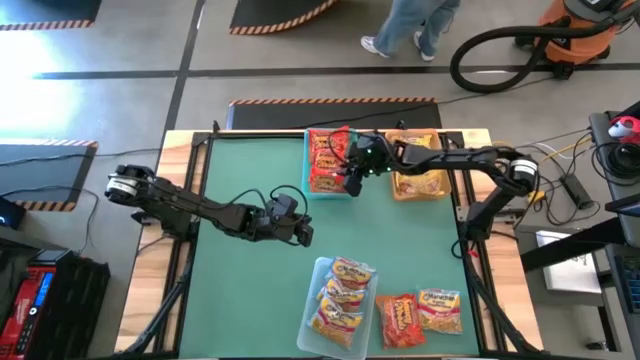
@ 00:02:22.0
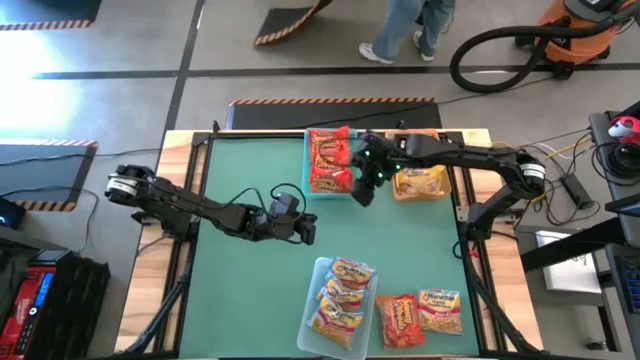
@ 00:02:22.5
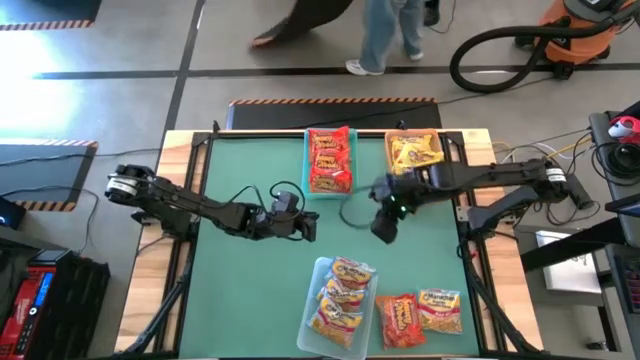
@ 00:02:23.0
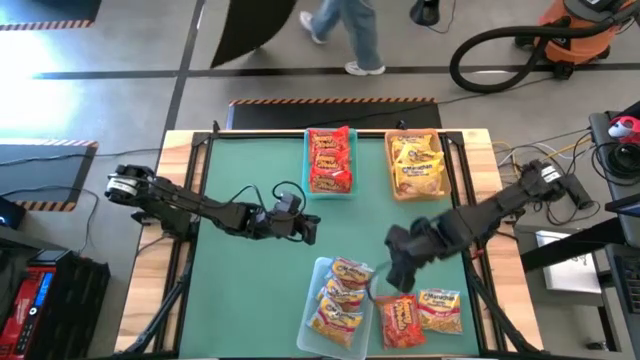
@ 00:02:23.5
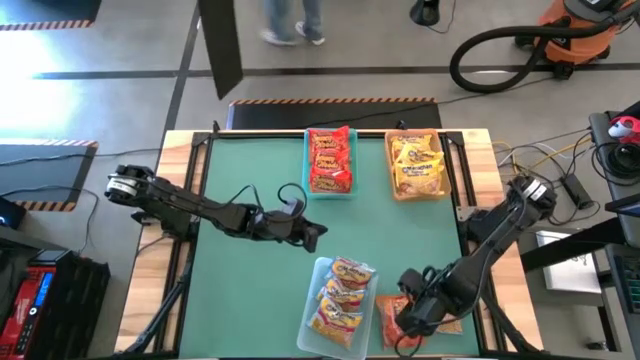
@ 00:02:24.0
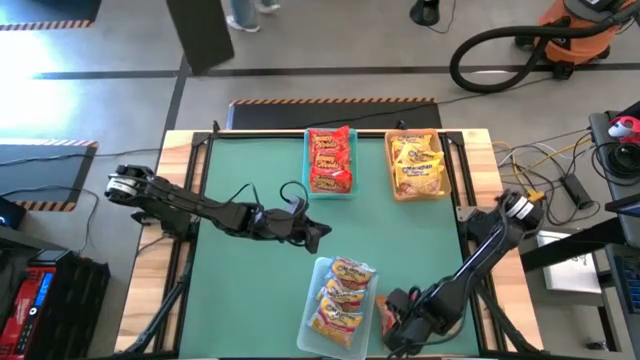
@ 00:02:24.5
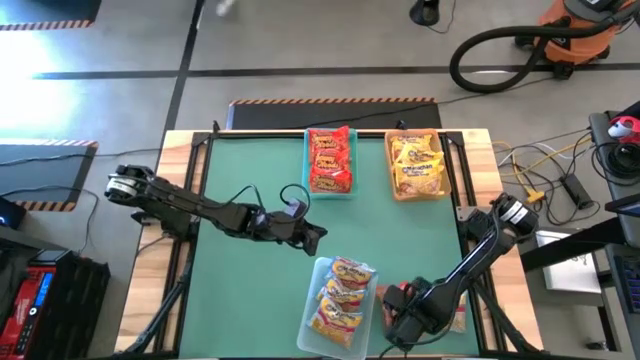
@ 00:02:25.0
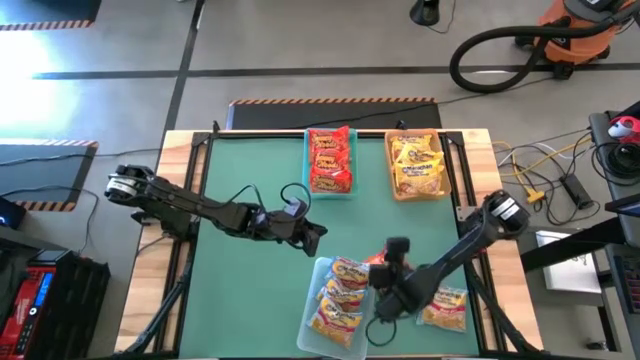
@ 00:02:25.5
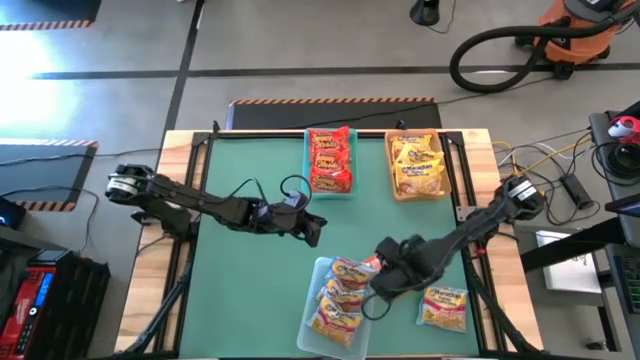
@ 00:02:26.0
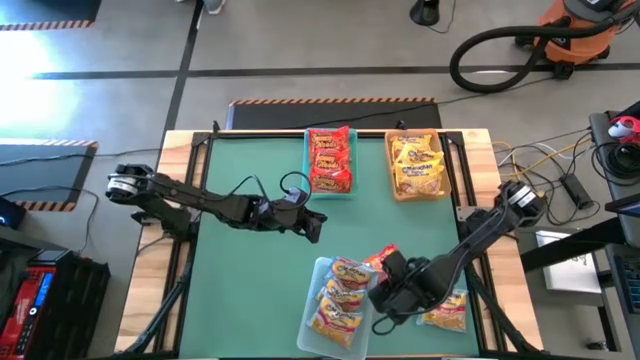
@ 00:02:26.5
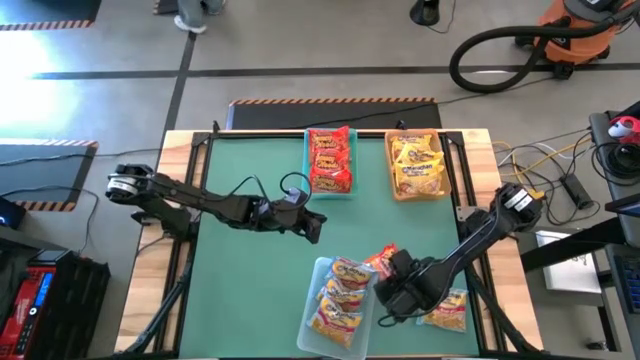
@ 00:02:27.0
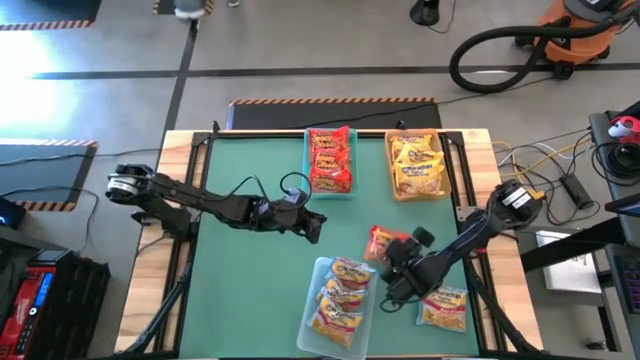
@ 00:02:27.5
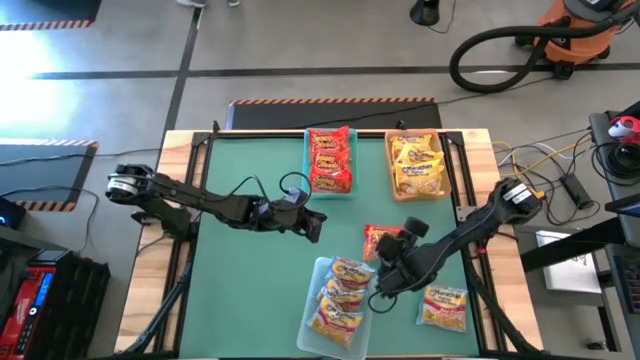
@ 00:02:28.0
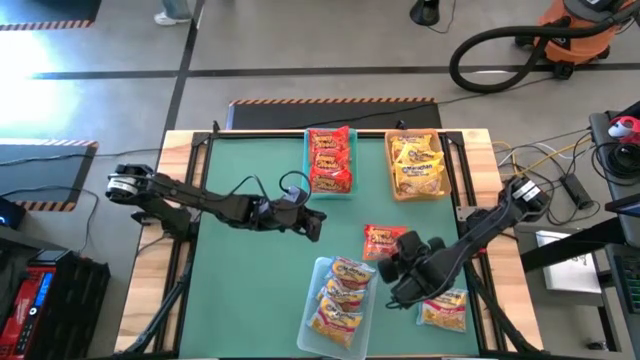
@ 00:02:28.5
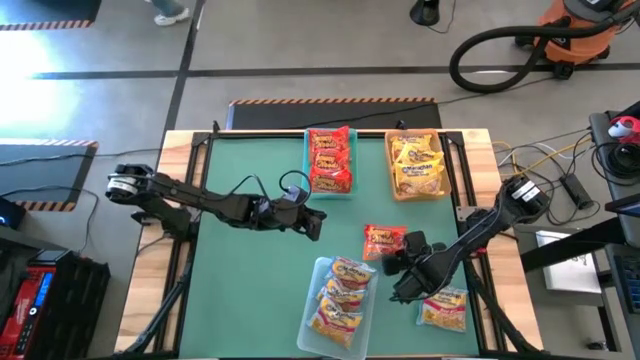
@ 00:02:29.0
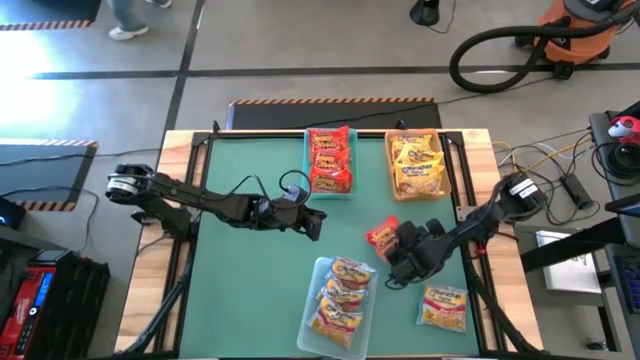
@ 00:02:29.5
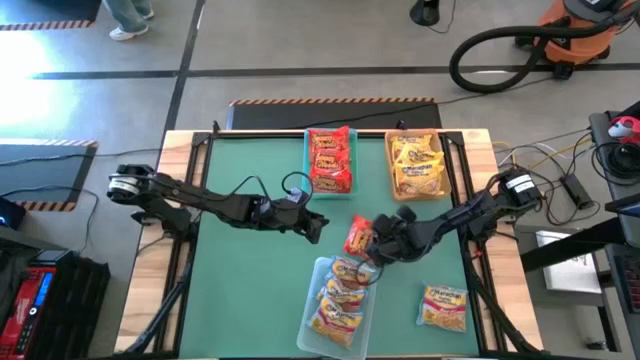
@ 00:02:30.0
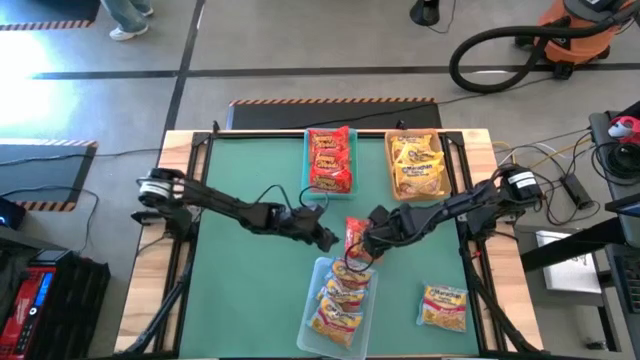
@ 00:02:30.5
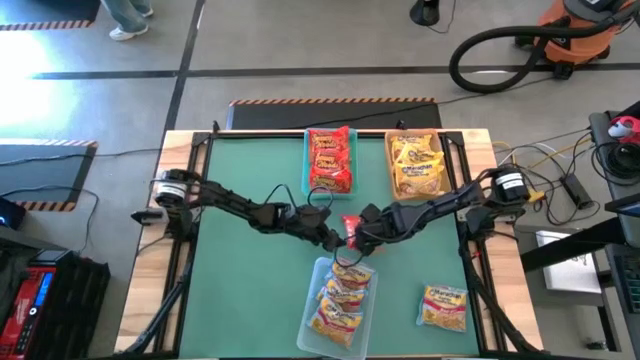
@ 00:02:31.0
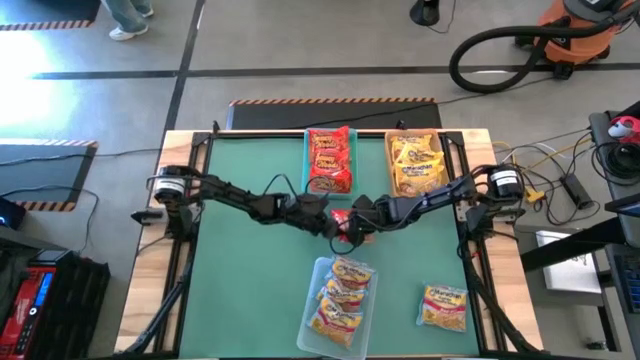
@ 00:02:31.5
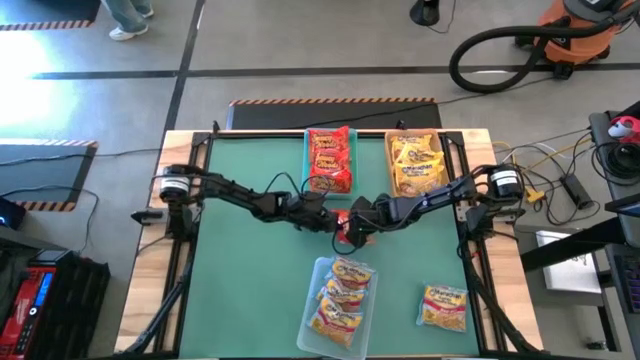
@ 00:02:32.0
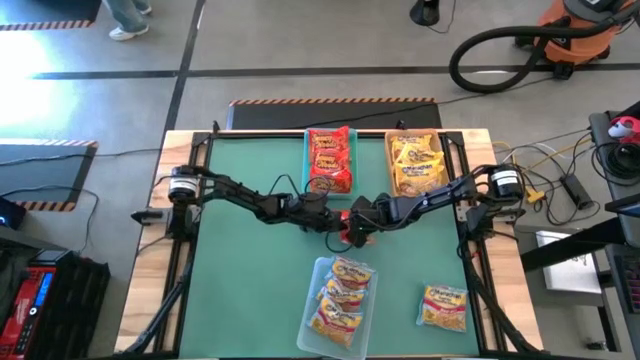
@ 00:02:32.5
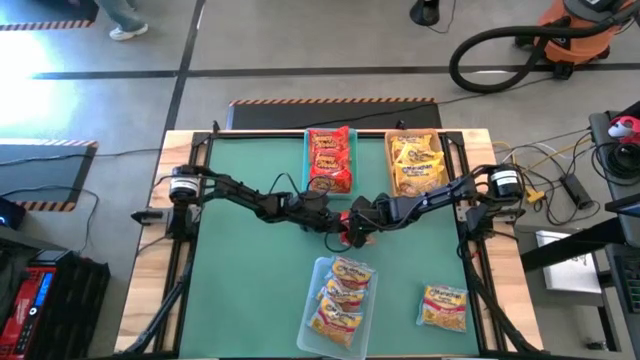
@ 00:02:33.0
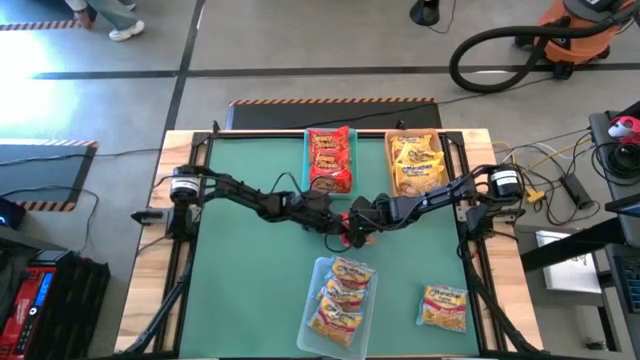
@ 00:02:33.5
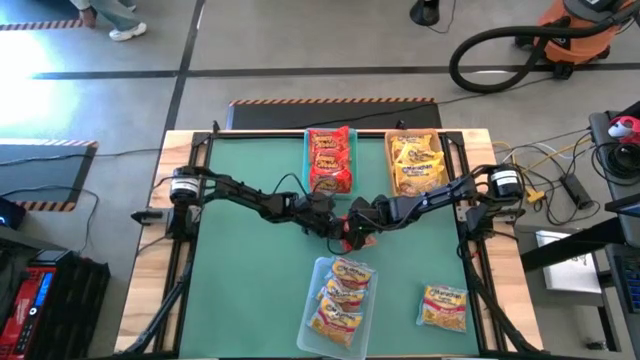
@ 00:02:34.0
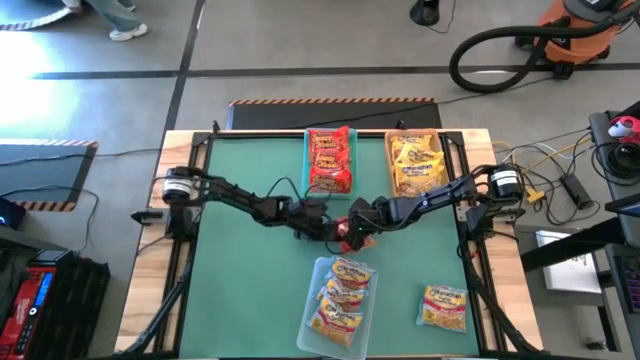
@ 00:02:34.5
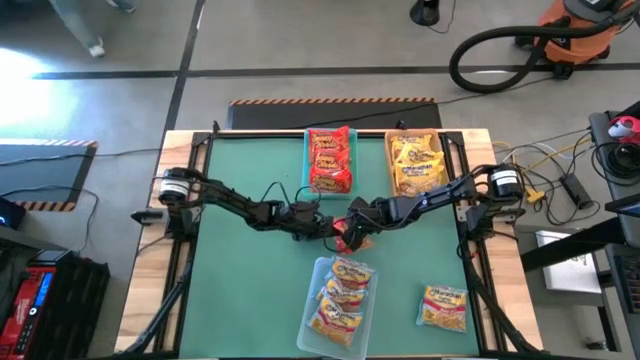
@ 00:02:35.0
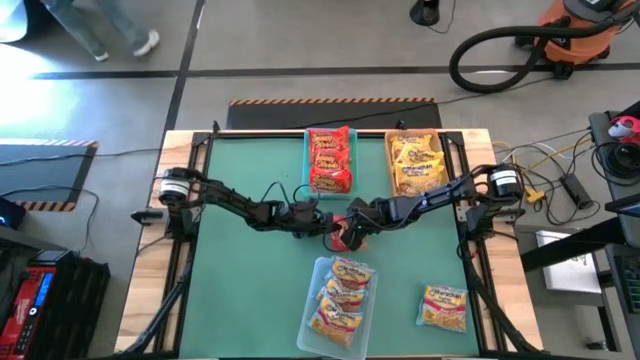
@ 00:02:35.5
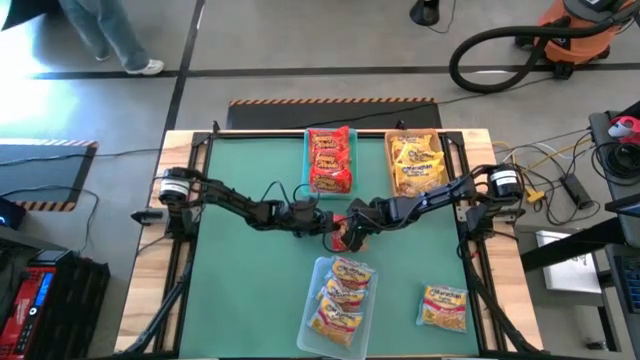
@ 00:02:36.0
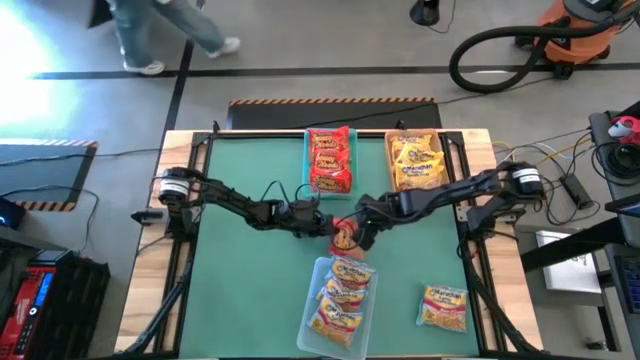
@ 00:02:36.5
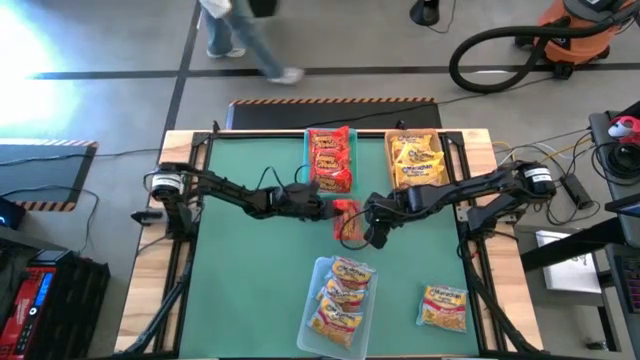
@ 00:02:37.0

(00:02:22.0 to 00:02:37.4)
Task: Sort Maruchan noodles
Put the red noodle pack into the green bin

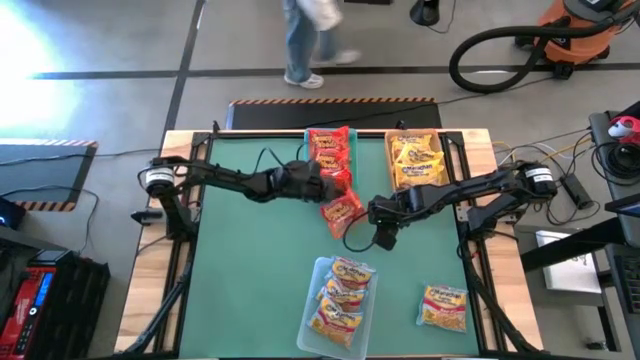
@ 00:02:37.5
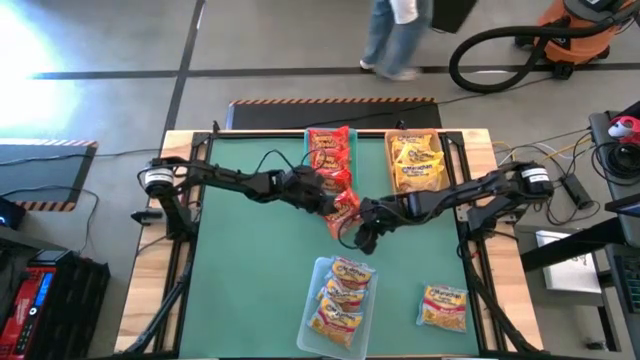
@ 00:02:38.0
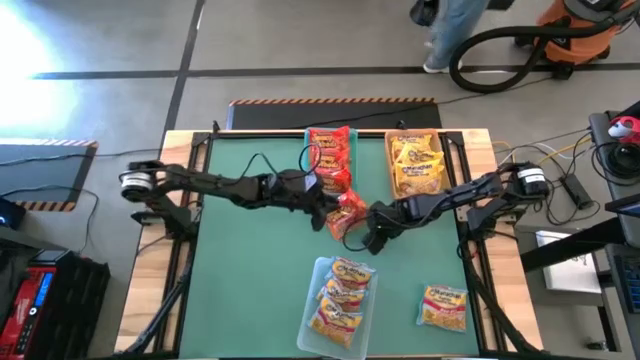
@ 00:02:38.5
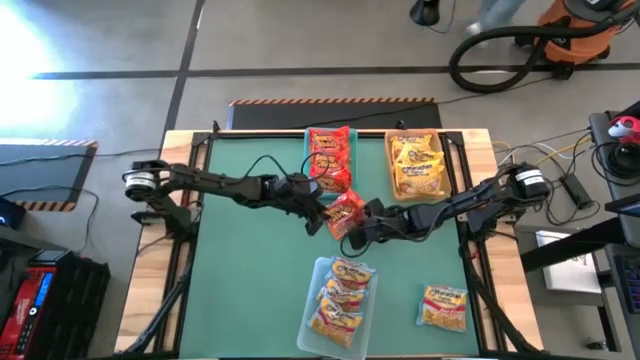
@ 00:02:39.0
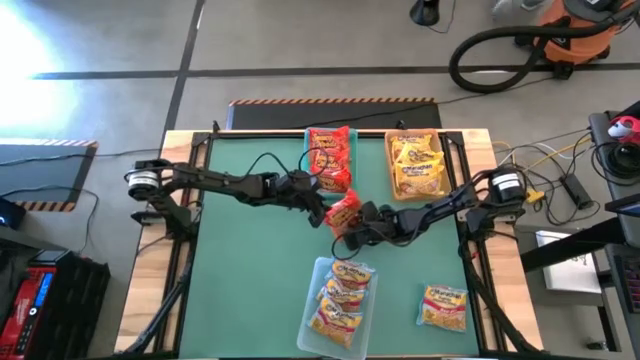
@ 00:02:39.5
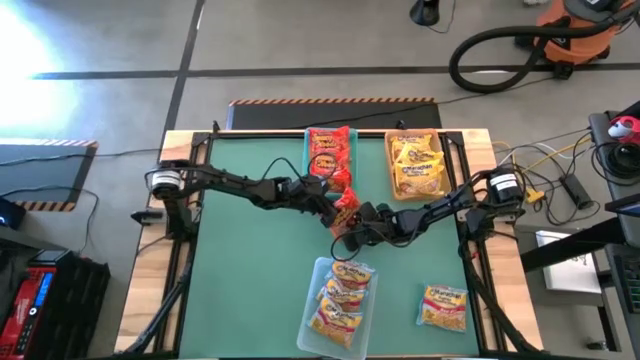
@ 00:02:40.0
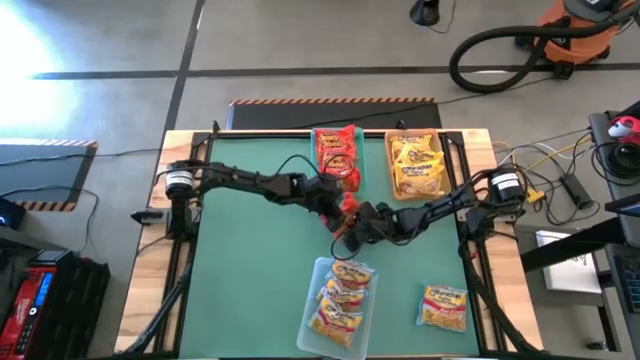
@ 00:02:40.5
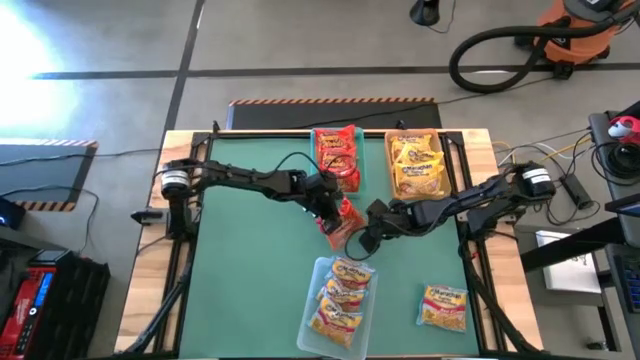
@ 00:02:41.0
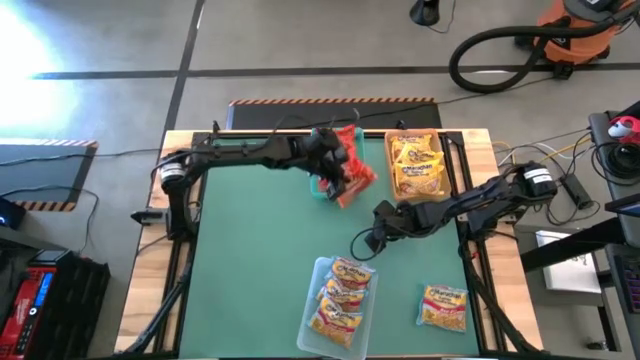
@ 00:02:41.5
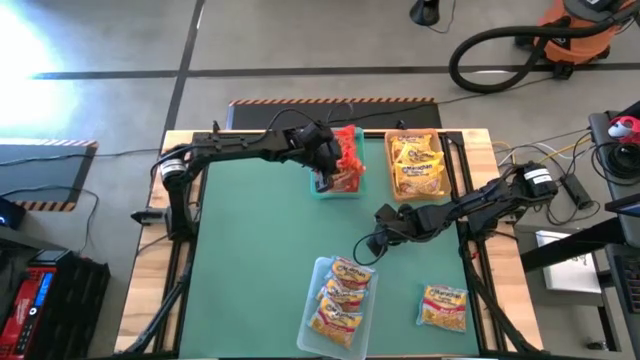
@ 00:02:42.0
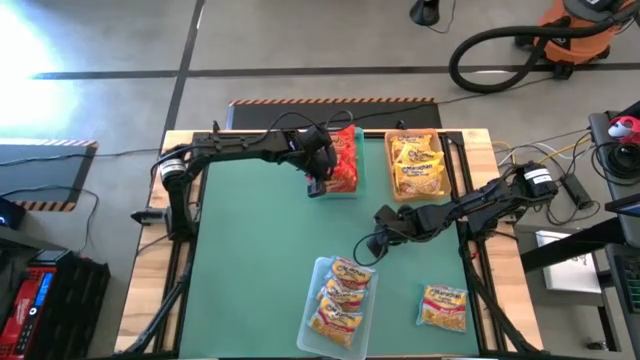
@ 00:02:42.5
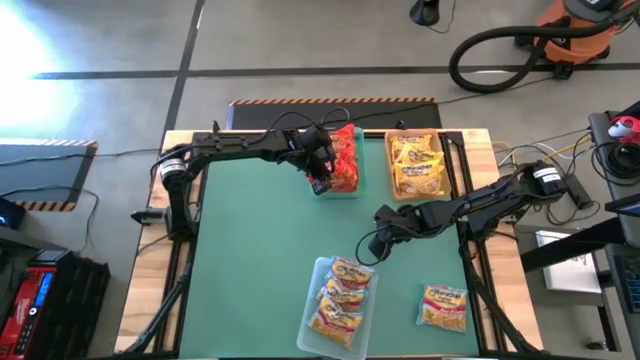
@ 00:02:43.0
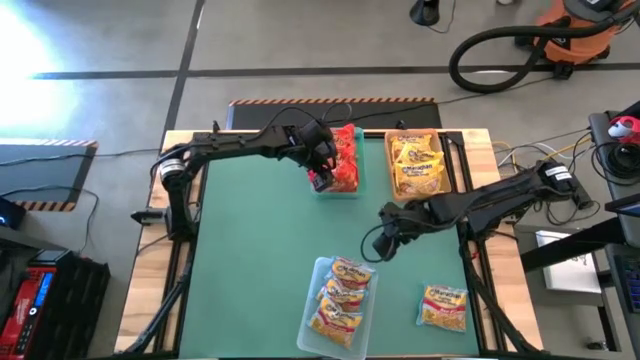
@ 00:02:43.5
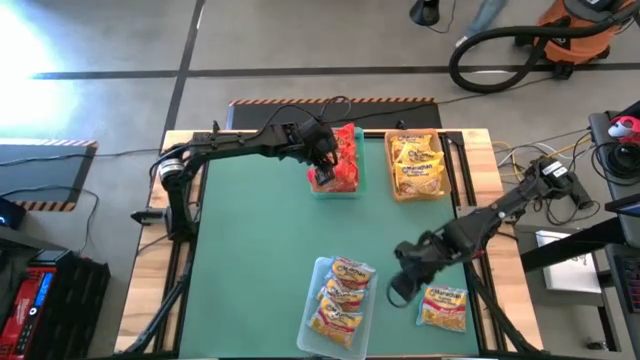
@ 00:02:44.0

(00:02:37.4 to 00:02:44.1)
Put the red noodle pack into the green bin
